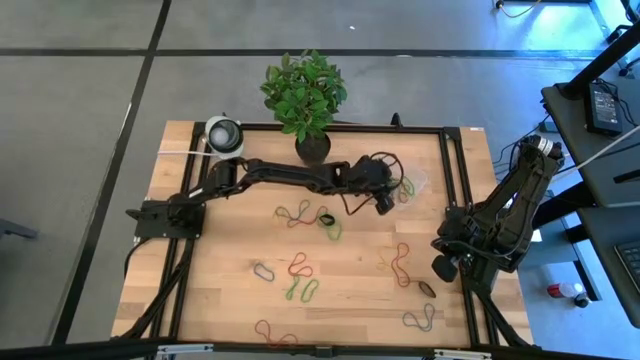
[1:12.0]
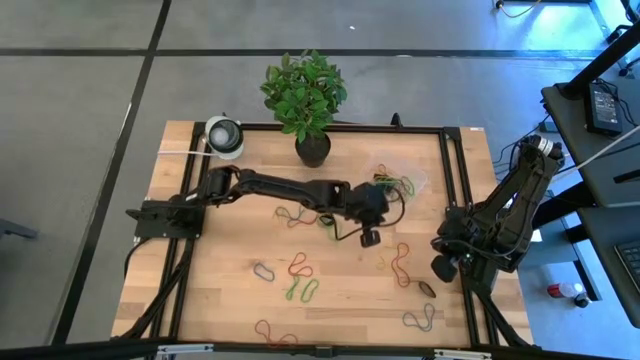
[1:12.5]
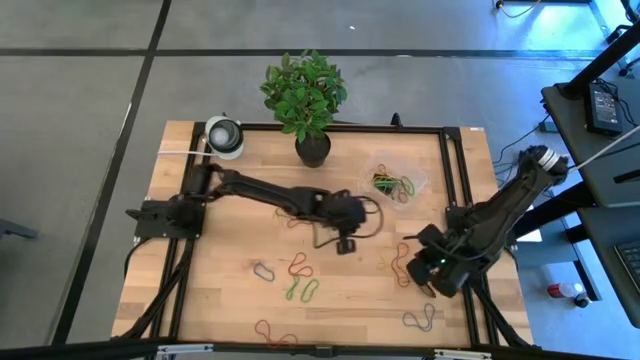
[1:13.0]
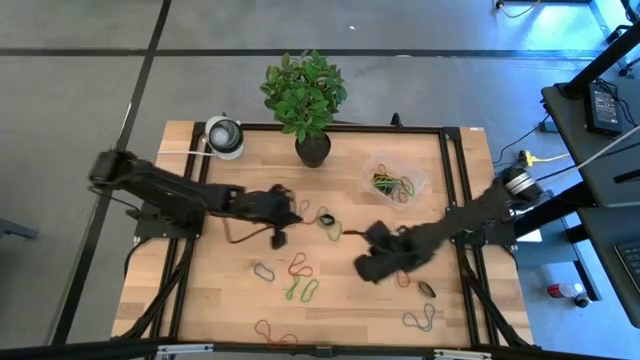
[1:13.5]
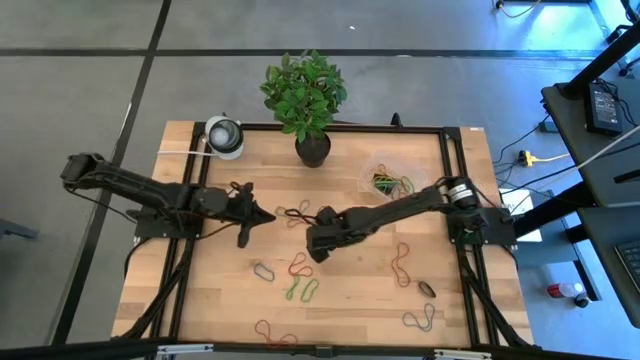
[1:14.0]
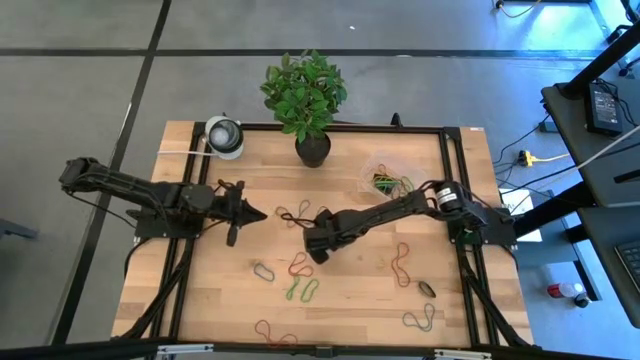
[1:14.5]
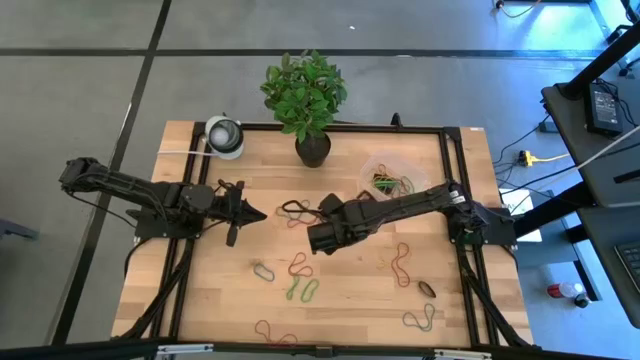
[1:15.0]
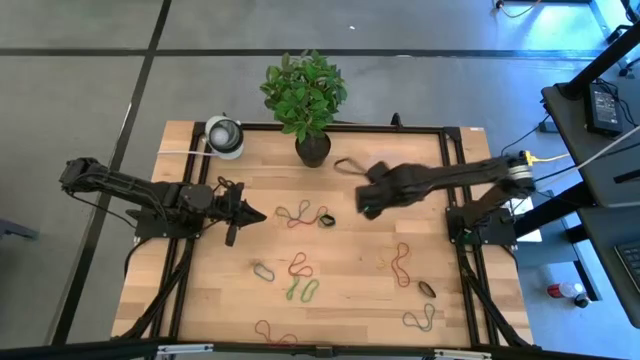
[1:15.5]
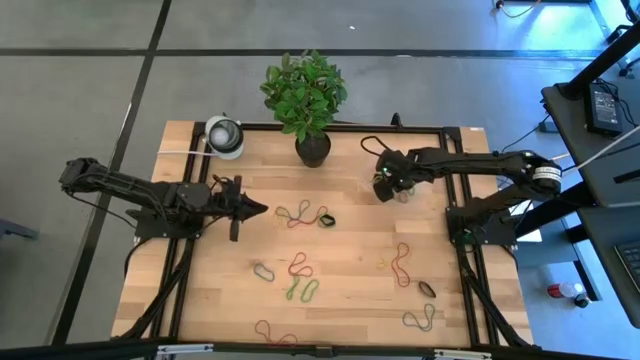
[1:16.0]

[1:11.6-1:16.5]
Task: Pick and place rubber bands into bin
Put the green rubber band into the bin

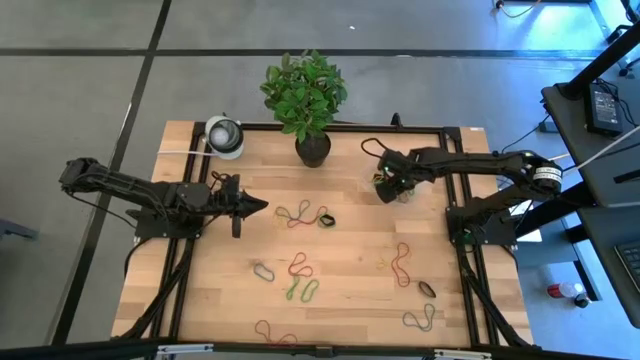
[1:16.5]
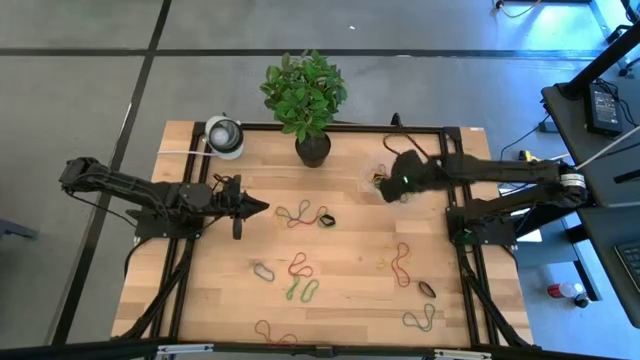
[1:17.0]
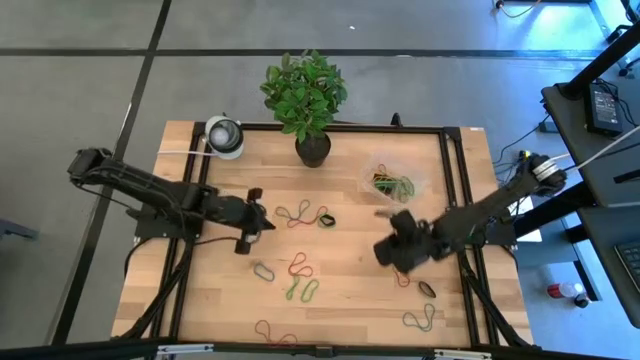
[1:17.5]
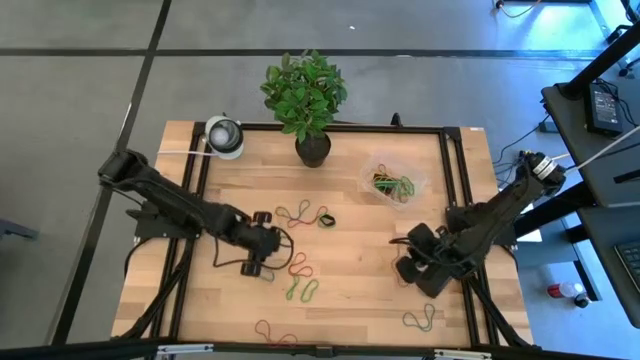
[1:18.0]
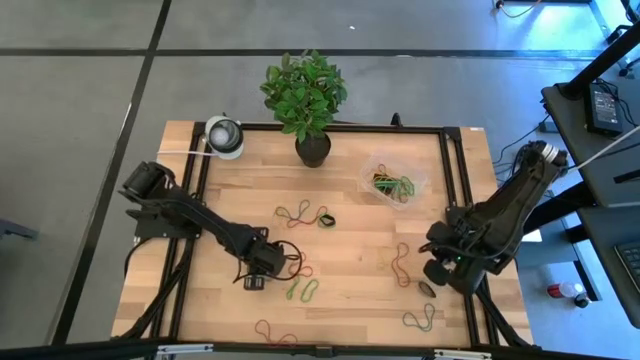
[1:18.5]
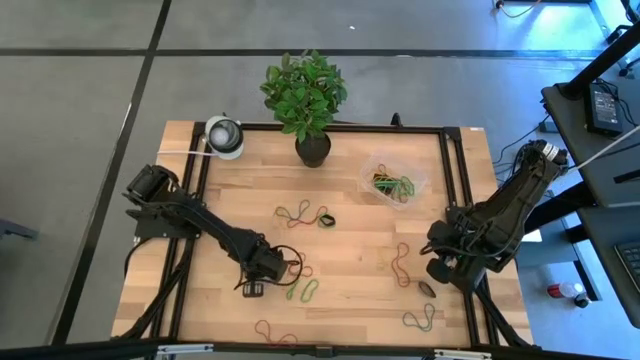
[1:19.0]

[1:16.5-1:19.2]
Put the bottom left blue rubber band into the bin

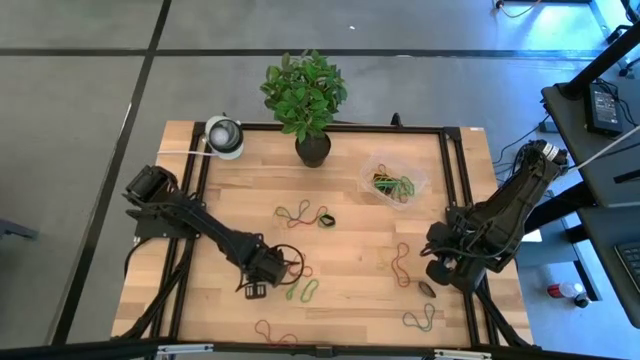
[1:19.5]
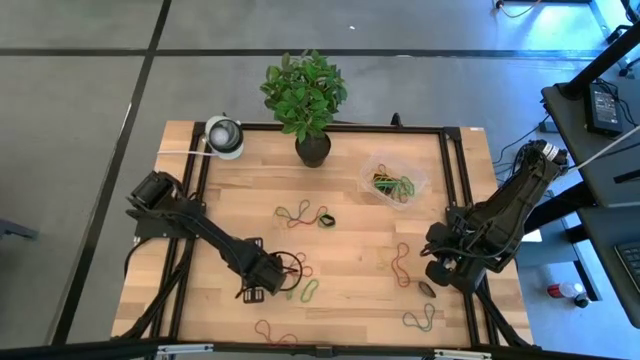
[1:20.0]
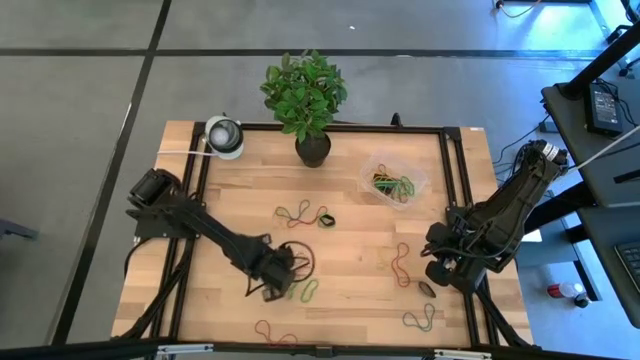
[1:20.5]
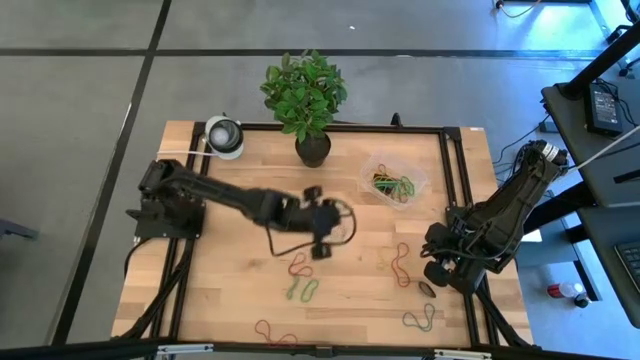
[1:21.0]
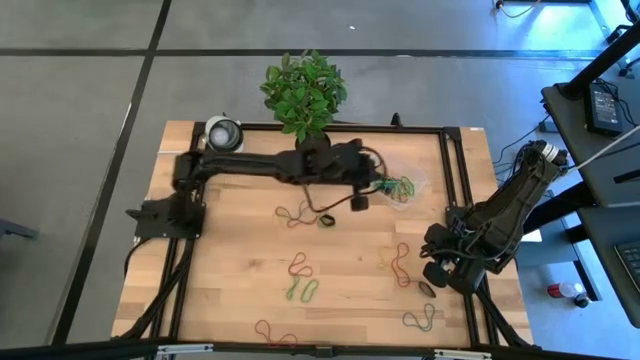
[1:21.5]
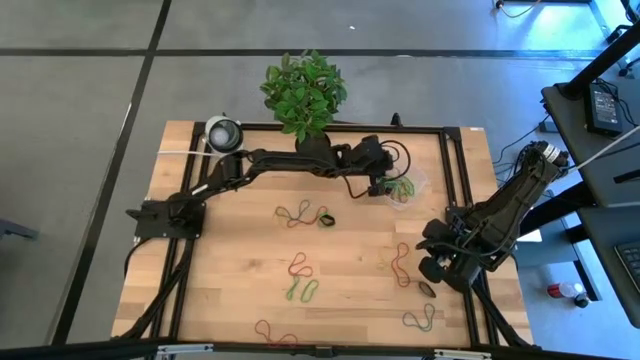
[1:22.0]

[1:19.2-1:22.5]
Put the bottom left blue rubber band into the bin

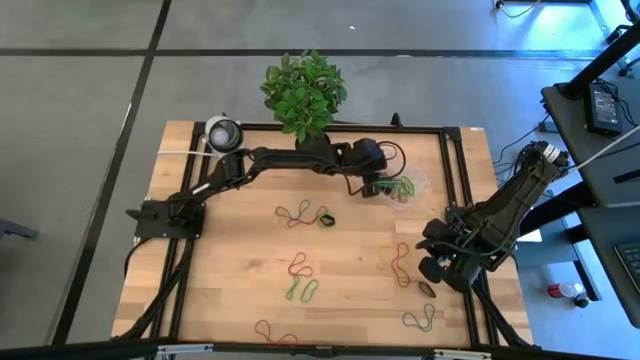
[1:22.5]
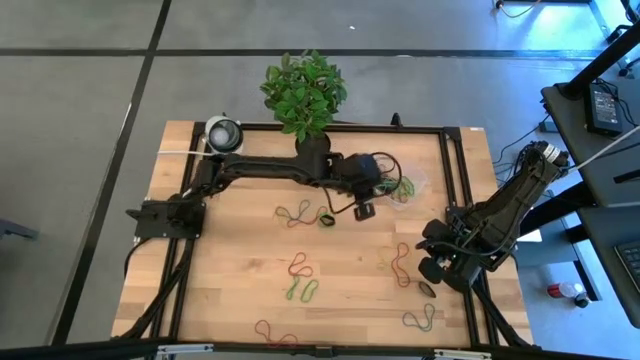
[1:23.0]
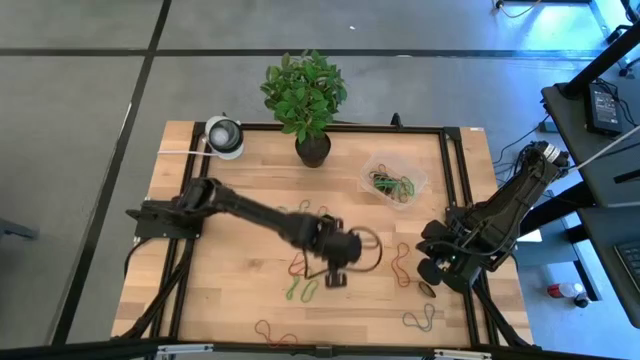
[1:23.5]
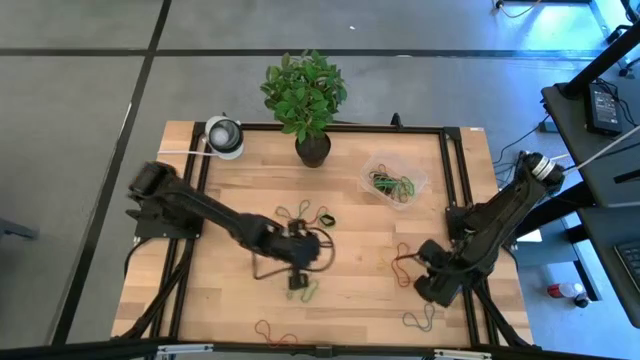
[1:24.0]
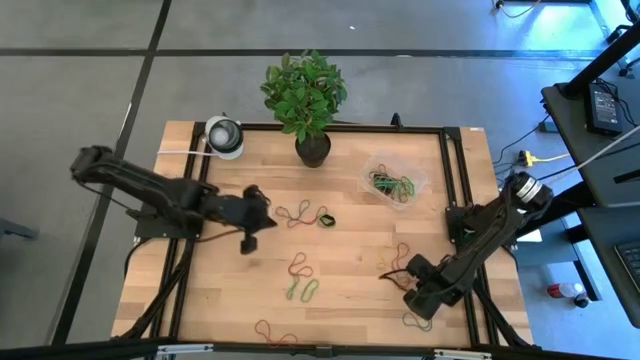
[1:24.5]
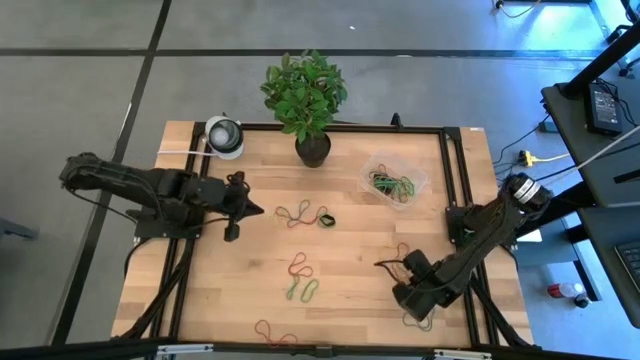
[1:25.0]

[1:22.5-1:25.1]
Put the bottom black rubber band into the bin

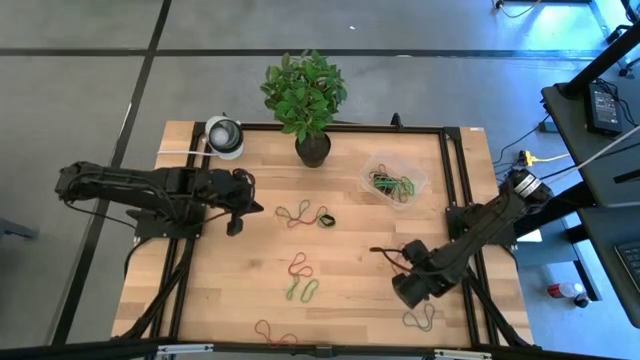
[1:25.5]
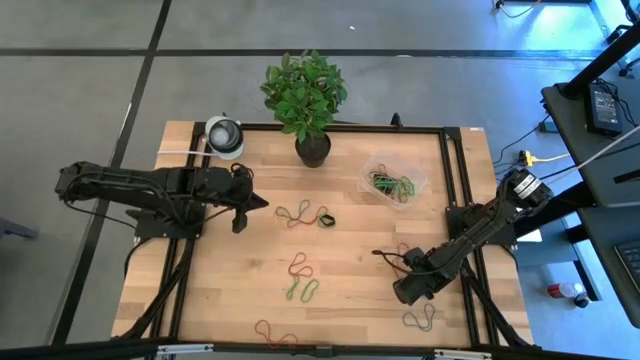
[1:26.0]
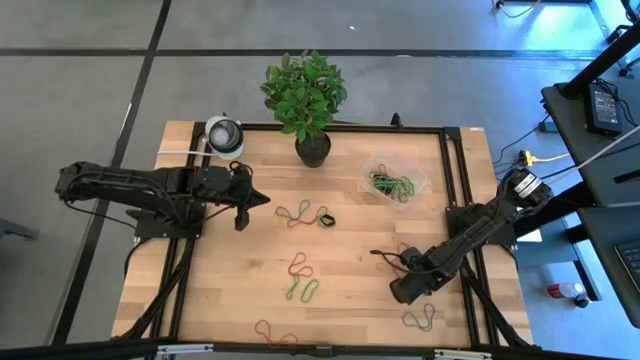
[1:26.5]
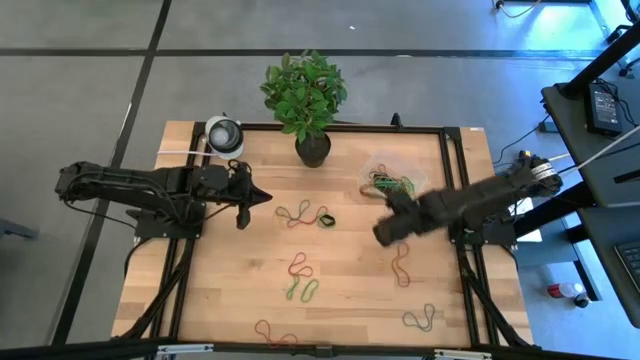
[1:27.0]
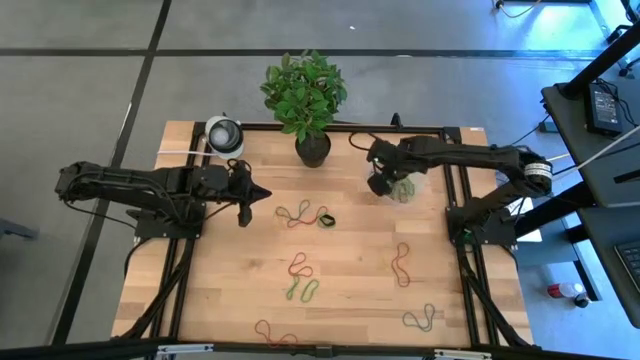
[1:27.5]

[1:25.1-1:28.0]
Put the bottom black rubber band into the bin

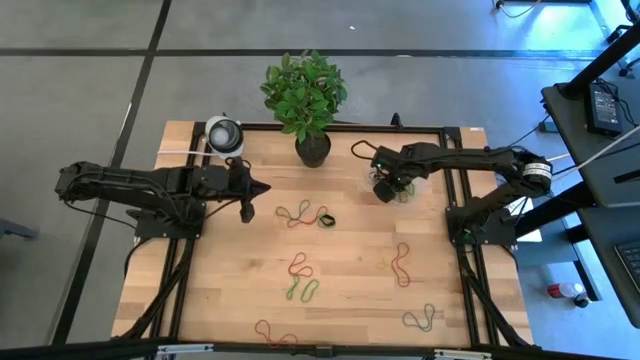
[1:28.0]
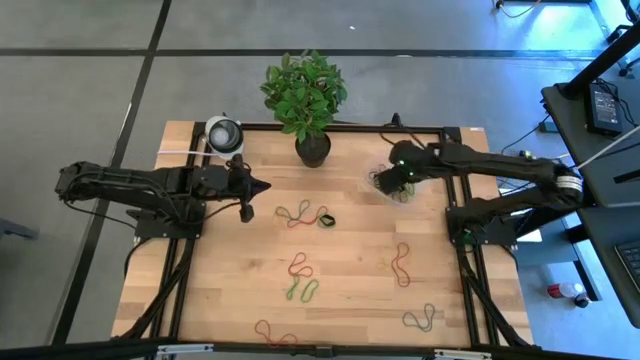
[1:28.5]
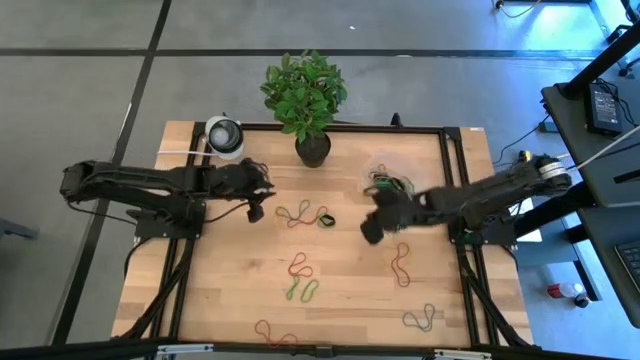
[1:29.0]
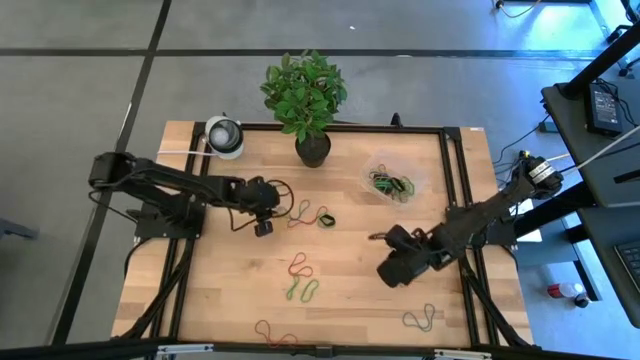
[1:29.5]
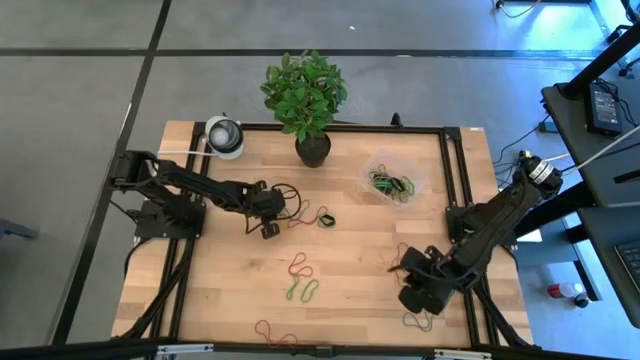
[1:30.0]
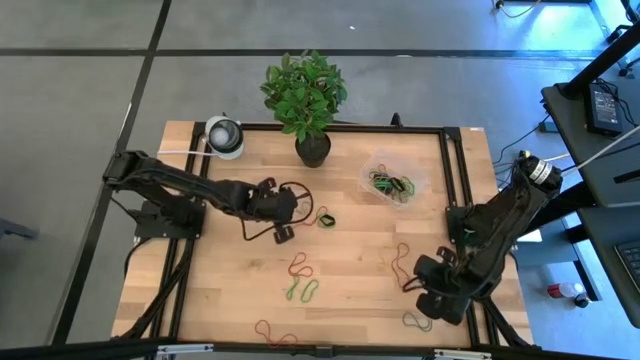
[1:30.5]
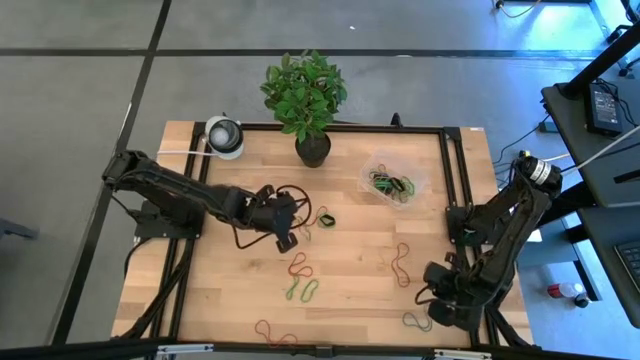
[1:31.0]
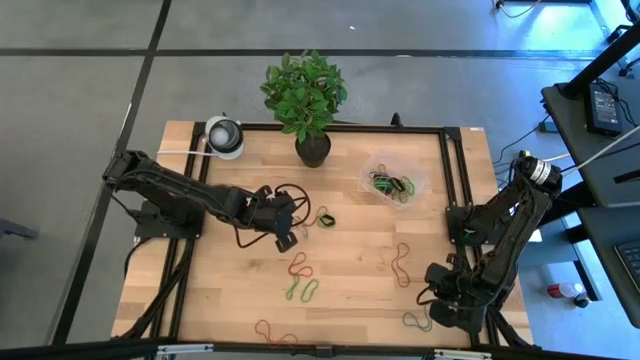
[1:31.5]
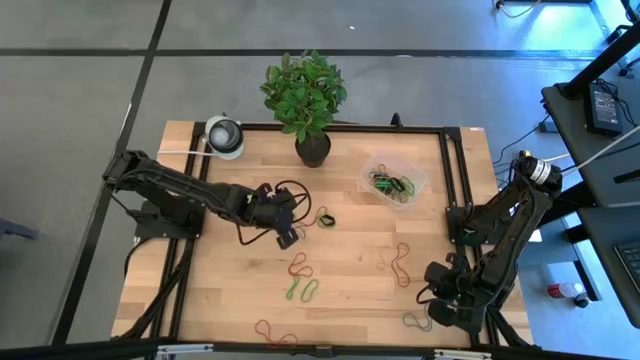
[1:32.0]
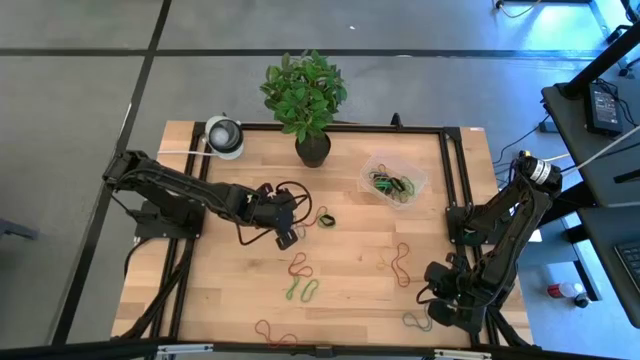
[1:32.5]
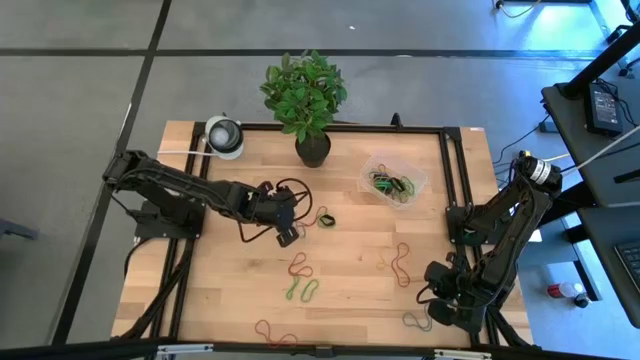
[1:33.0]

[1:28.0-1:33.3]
Put the top yellow rubber band into the bin
